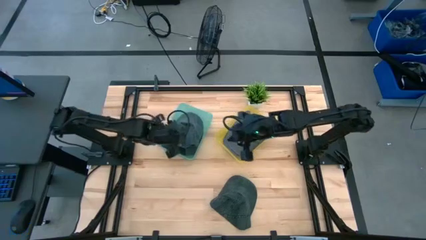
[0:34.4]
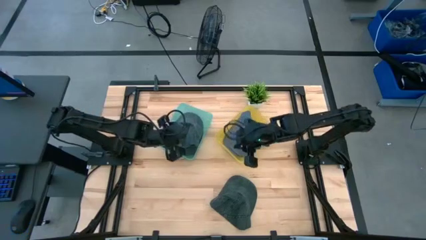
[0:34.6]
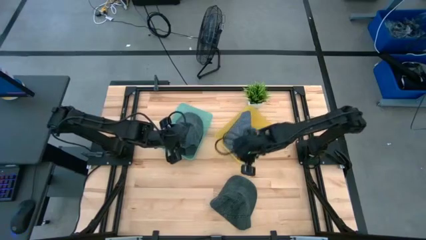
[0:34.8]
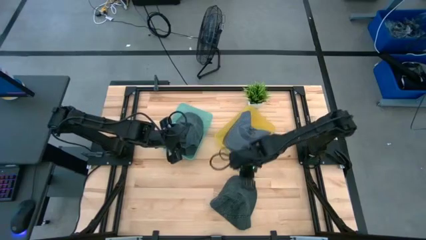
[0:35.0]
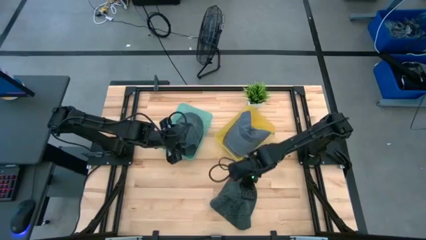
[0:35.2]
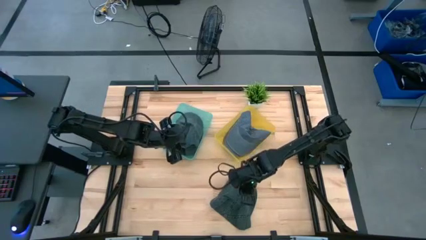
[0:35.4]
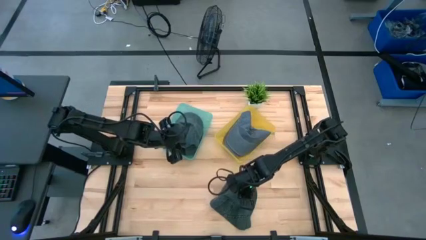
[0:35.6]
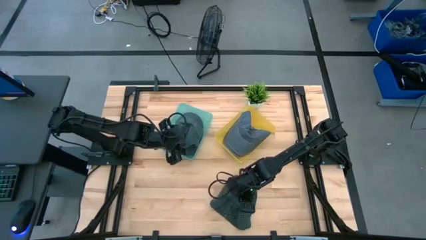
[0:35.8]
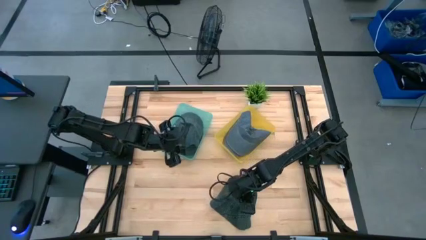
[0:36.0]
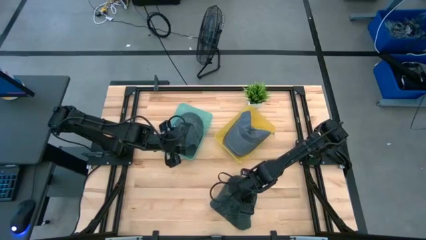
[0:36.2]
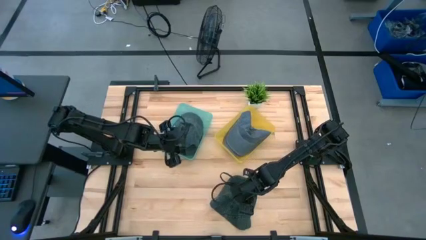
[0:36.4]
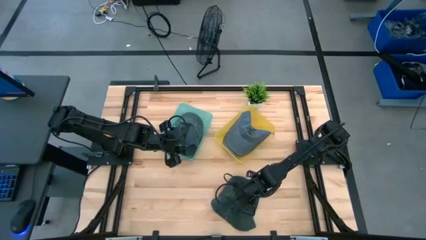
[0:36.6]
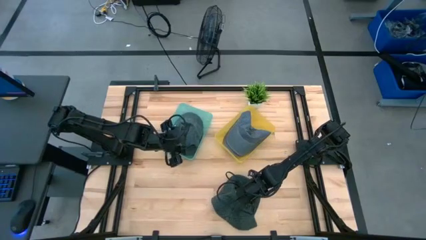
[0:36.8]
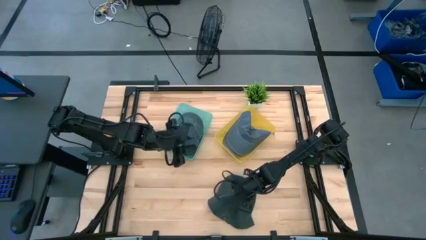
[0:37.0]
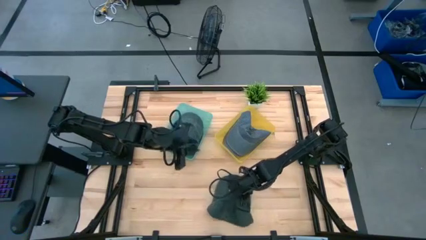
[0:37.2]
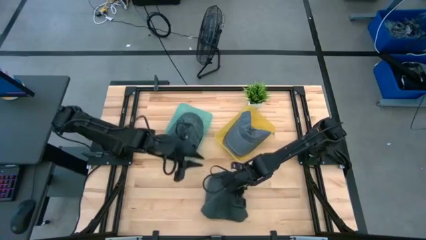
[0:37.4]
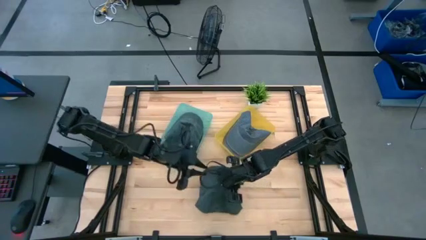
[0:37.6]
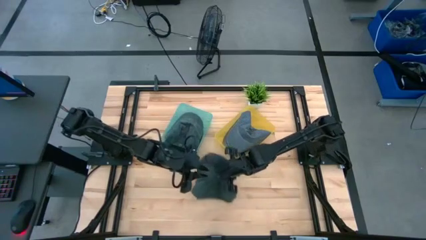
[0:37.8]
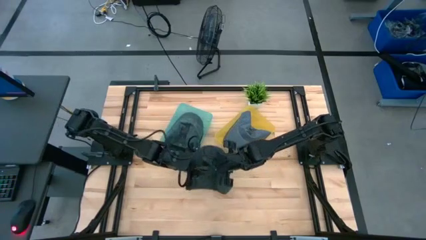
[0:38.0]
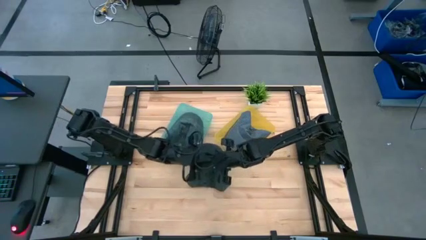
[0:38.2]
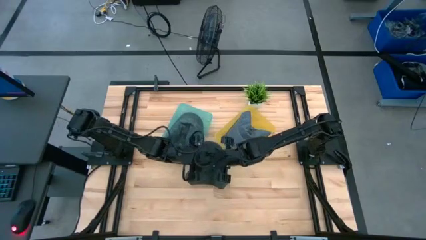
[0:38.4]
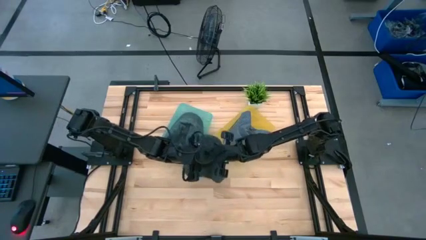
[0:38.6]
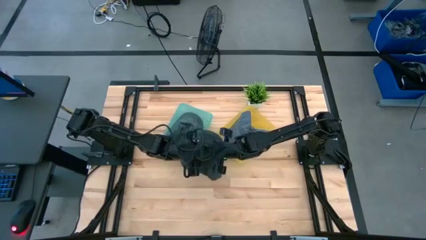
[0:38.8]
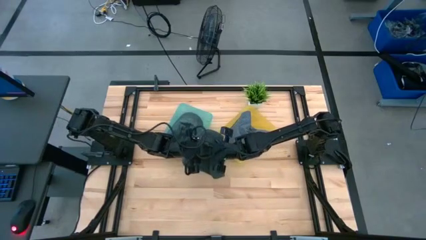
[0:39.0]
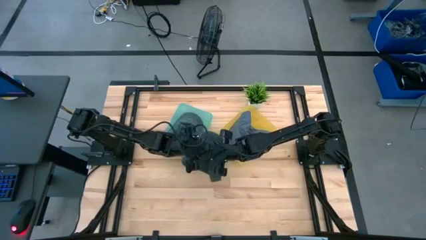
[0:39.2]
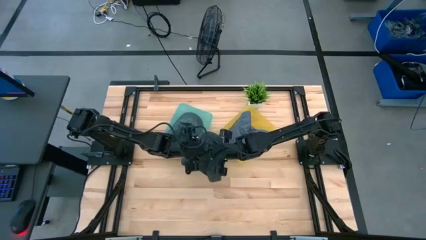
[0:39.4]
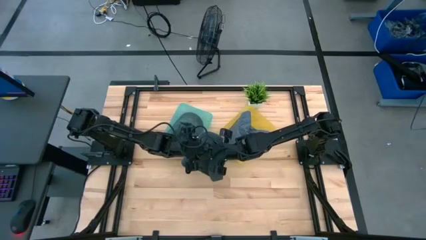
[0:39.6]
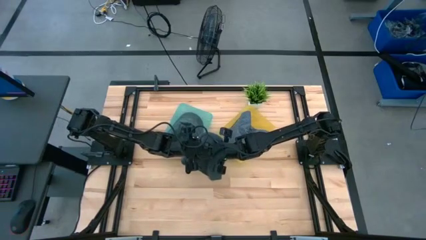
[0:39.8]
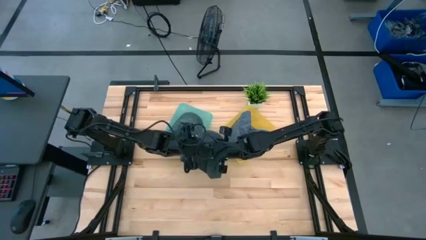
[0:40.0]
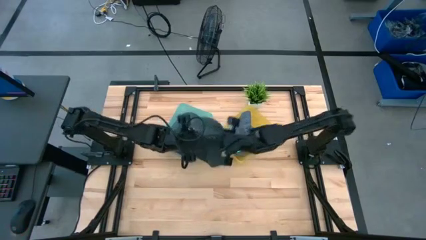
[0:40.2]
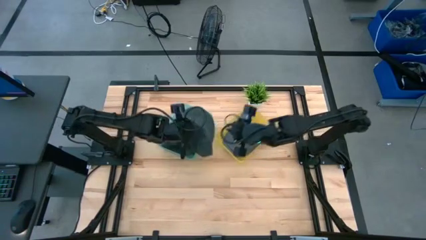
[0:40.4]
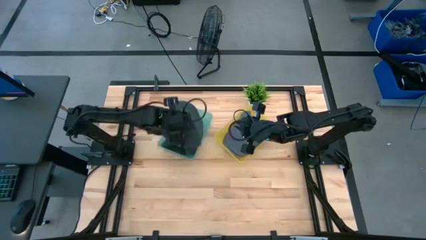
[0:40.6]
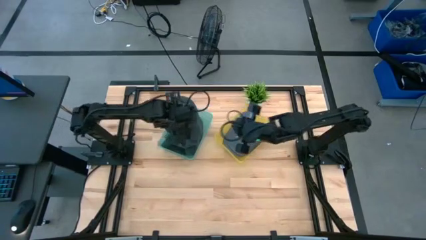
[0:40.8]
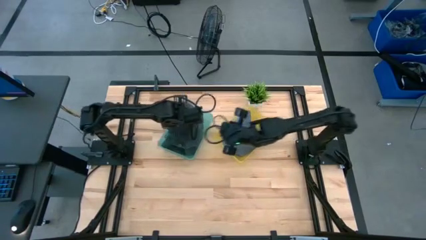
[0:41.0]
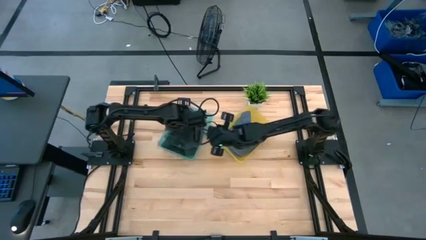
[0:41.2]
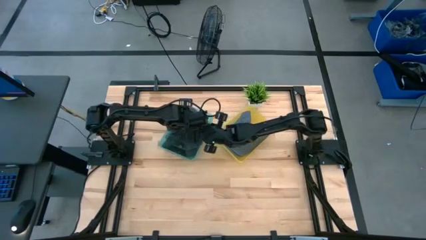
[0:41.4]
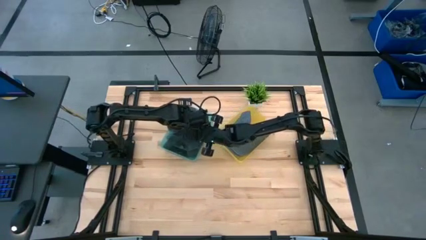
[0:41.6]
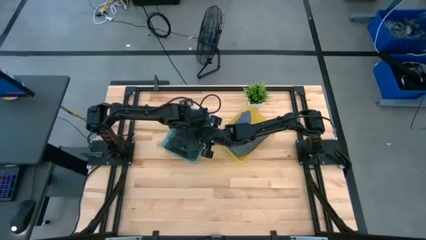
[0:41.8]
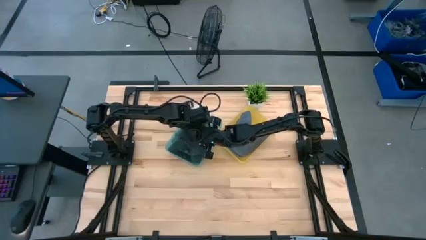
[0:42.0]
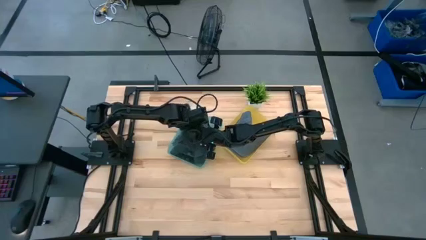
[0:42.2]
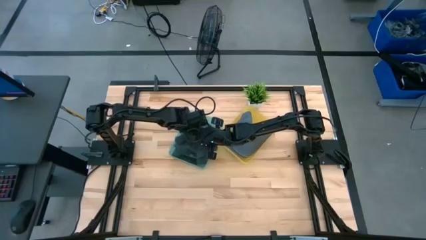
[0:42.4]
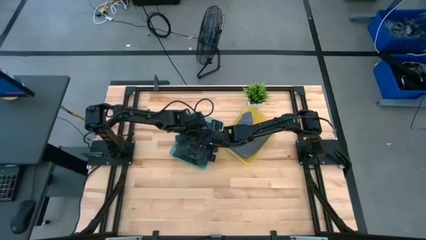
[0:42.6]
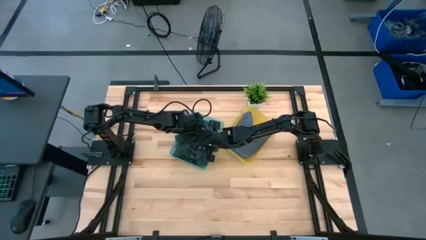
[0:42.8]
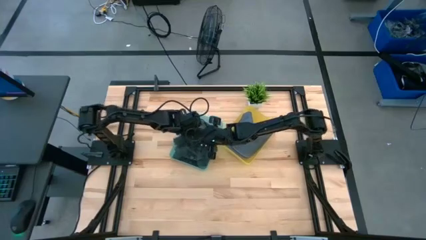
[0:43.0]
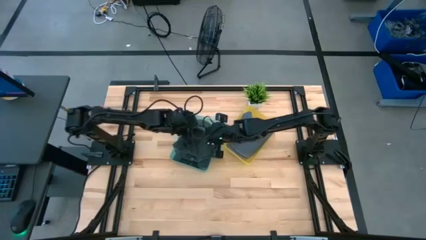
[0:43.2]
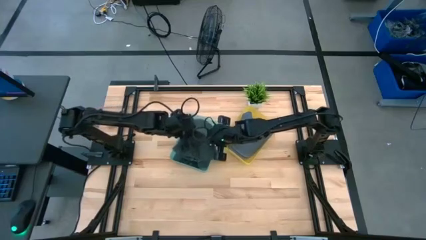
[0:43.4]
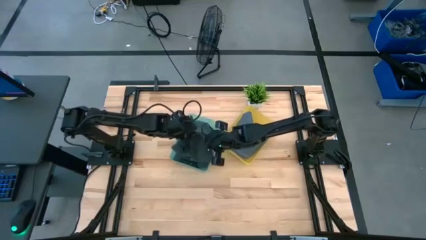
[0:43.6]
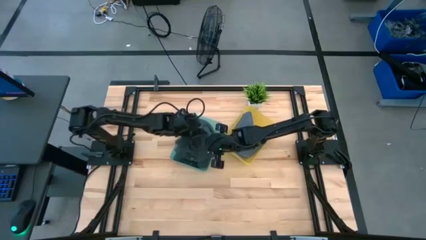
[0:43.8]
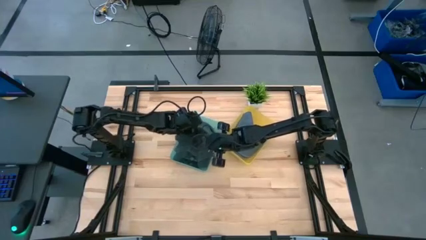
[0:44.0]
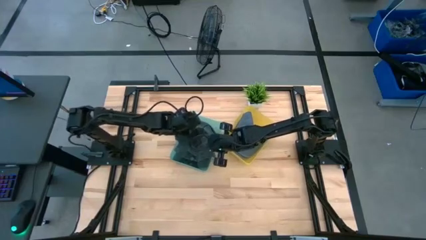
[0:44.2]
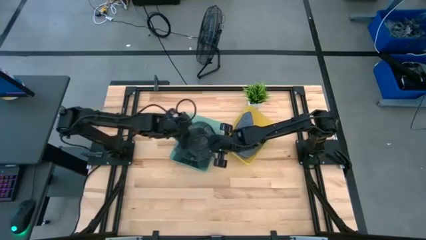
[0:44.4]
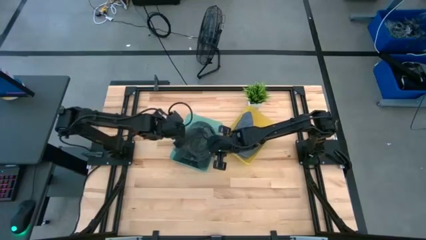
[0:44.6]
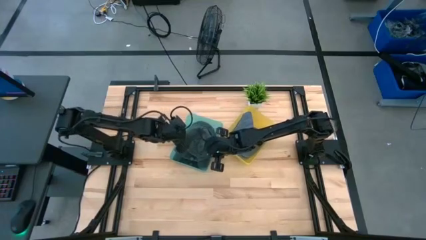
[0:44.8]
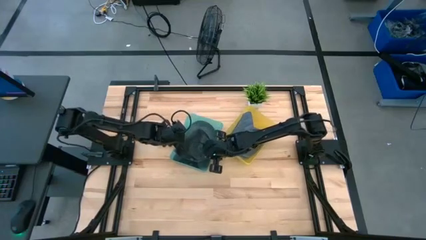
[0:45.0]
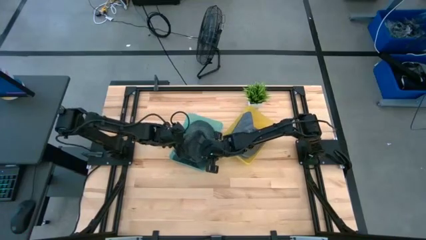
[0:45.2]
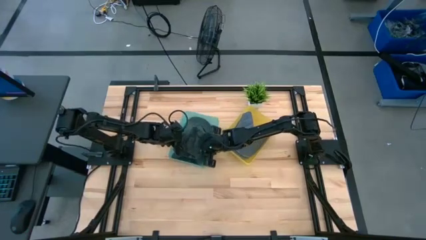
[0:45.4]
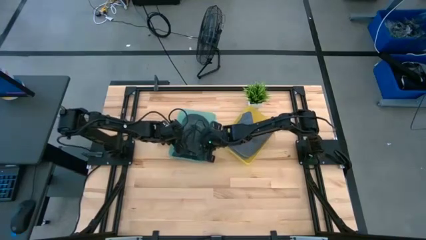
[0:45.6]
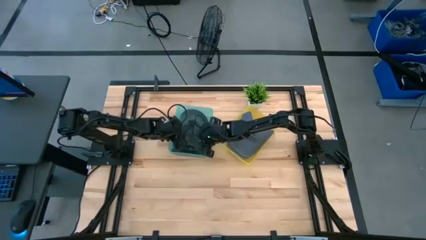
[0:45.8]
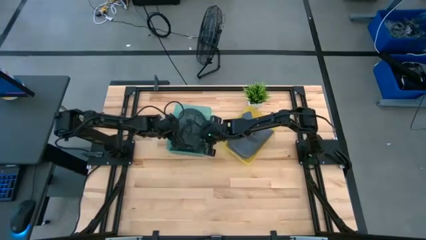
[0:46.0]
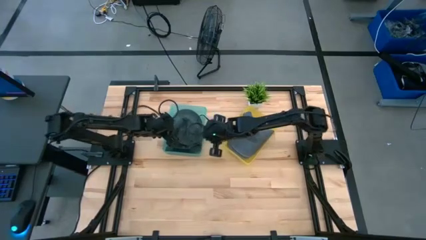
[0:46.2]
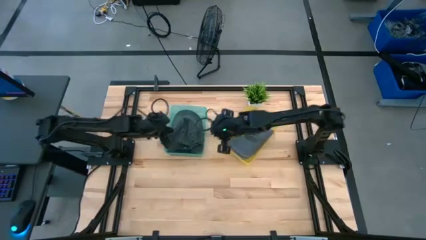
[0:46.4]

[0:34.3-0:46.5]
Task: Pick & Place hat
Put the black cap into the blue basket

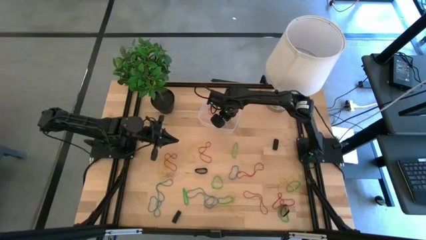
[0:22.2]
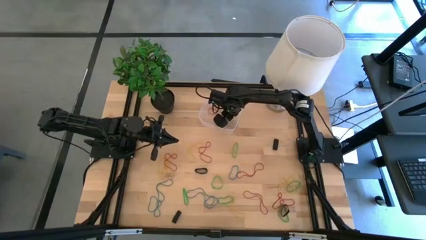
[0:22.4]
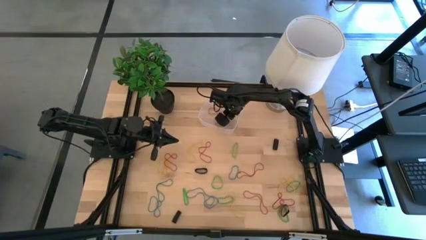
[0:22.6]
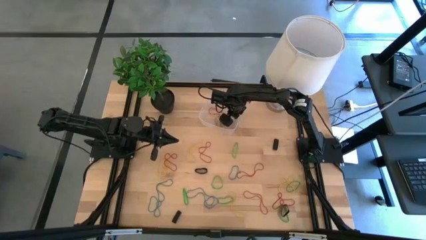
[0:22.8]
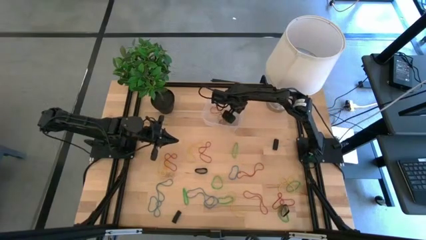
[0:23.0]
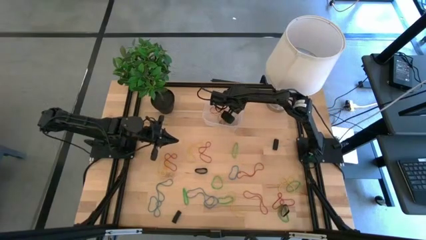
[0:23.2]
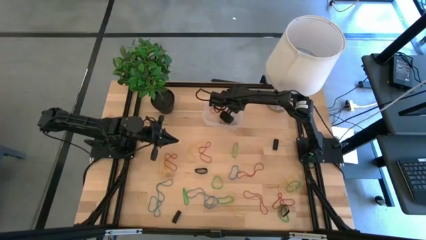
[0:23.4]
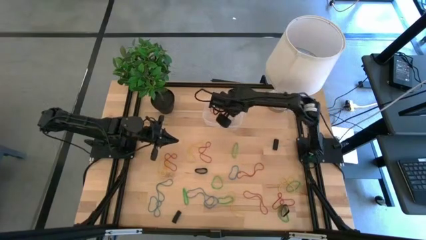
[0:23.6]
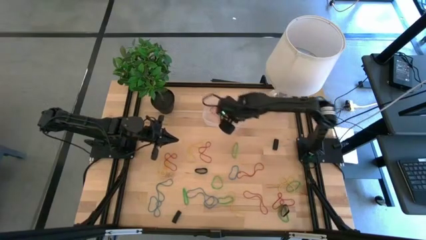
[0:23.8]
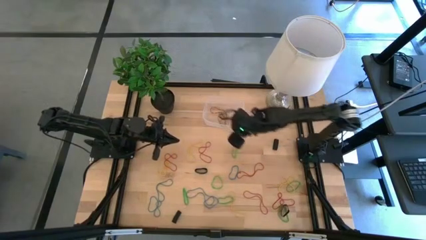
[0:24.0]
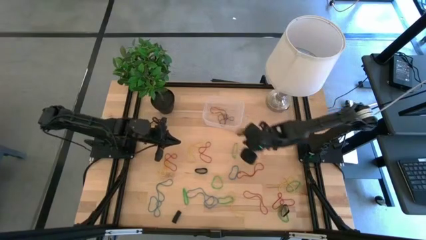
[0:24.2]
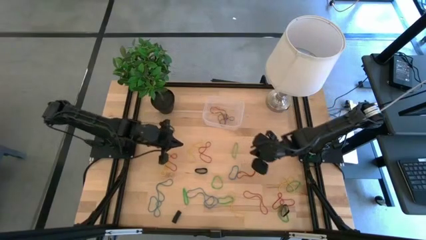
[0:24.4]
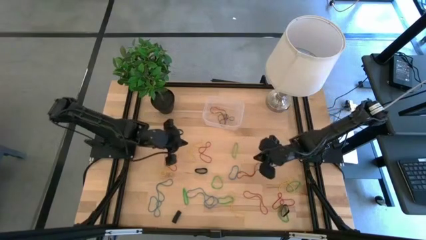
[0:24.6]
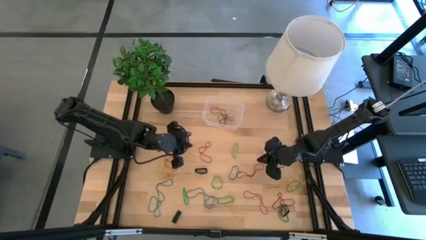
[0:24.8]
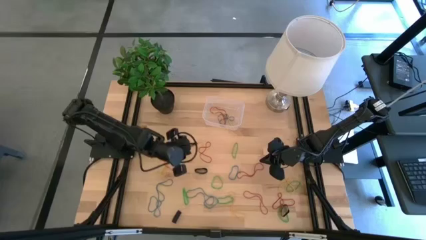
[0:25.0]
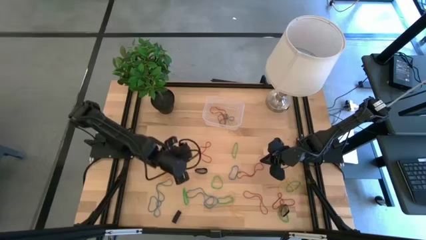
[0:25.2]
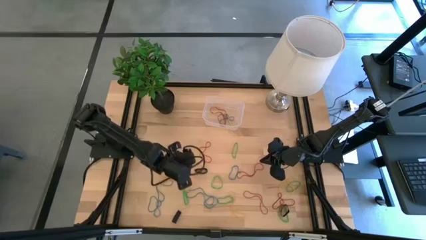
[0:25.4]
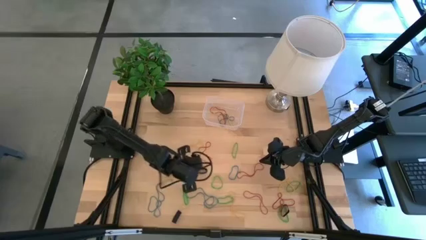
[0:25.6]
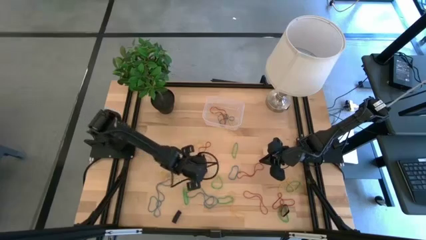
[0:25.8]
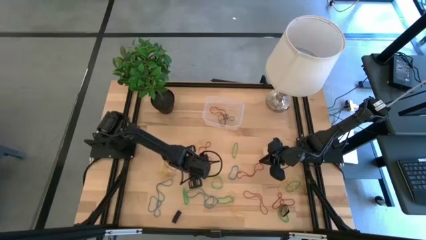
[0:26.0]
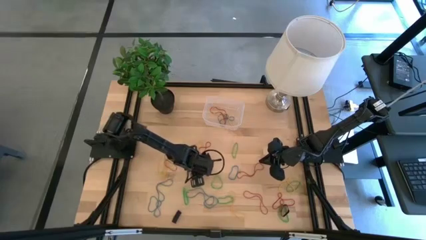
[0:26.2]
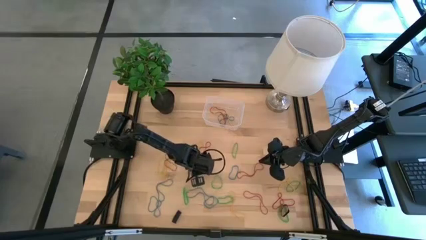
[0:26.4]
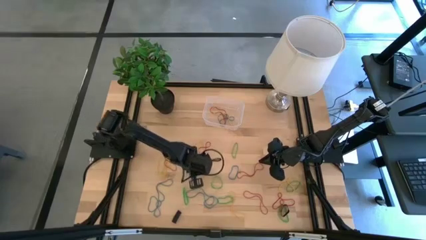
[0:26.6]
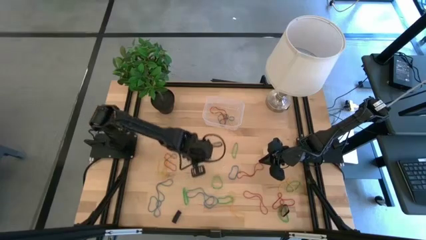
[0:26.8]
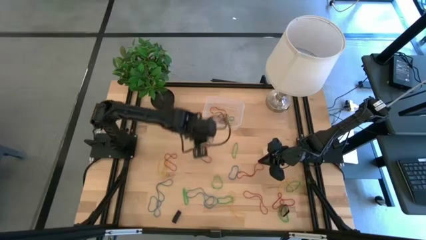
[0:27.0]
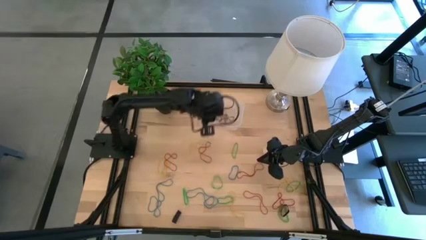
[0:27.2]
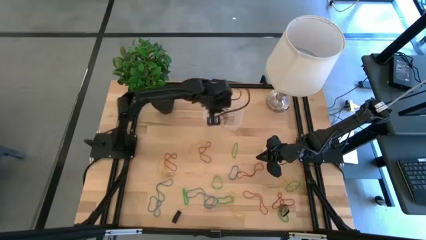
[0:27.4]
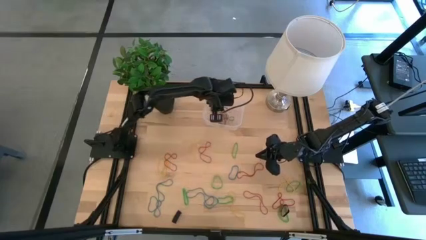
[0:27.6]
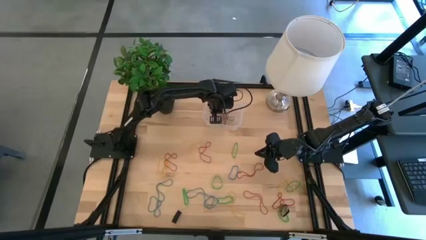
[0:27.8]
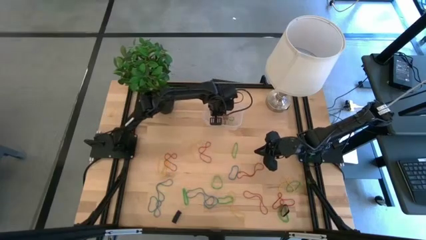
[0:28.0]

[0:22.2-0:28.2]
Task: Pick and place rubber bands into bin
Put the black rubber band into the transparent bin
